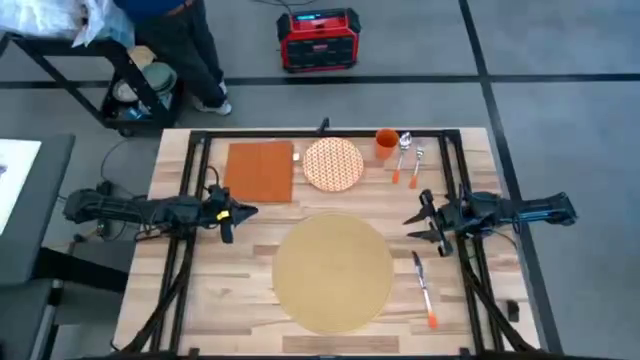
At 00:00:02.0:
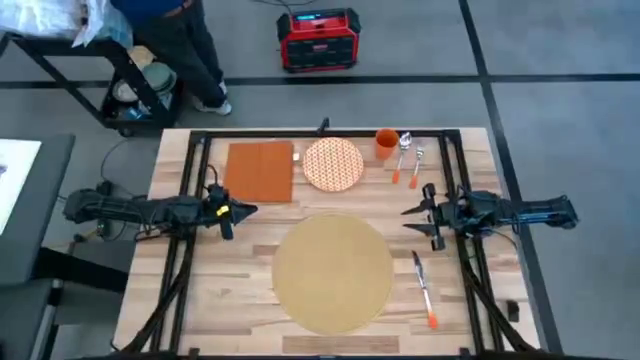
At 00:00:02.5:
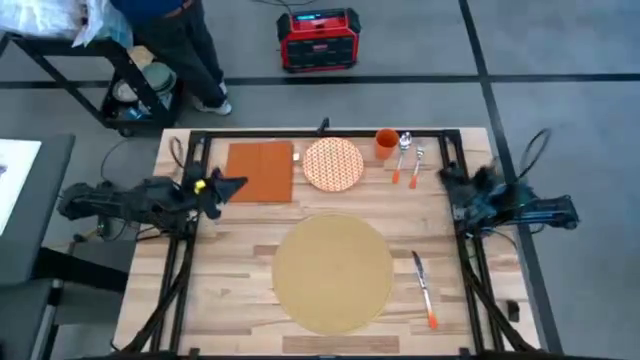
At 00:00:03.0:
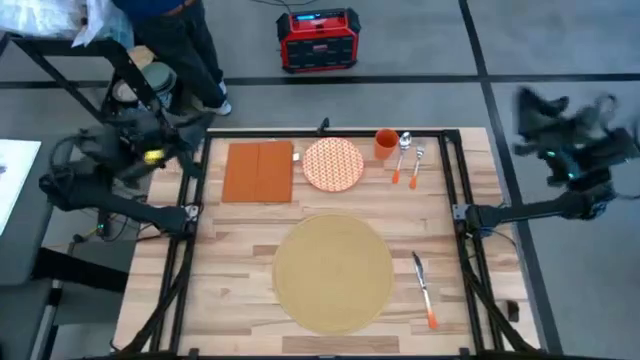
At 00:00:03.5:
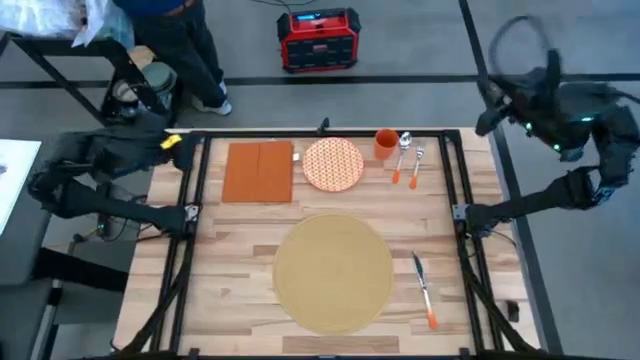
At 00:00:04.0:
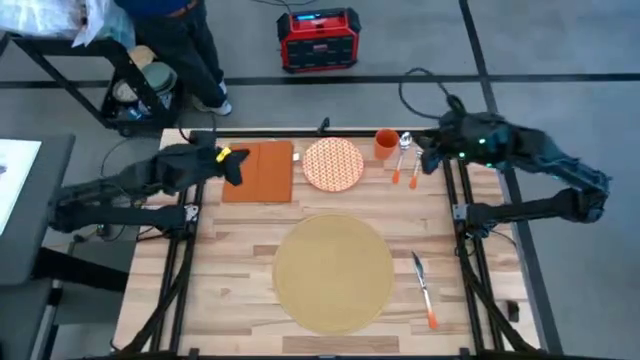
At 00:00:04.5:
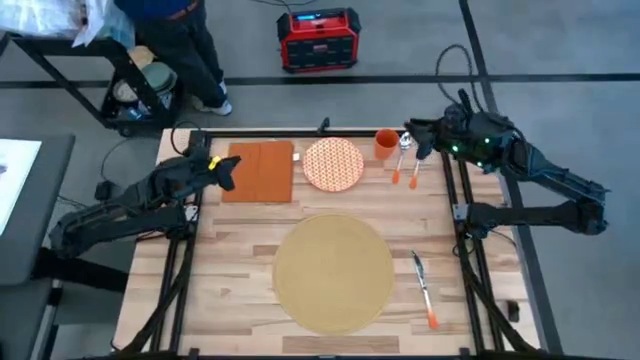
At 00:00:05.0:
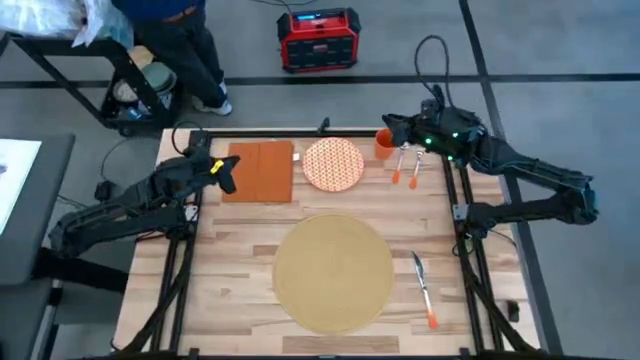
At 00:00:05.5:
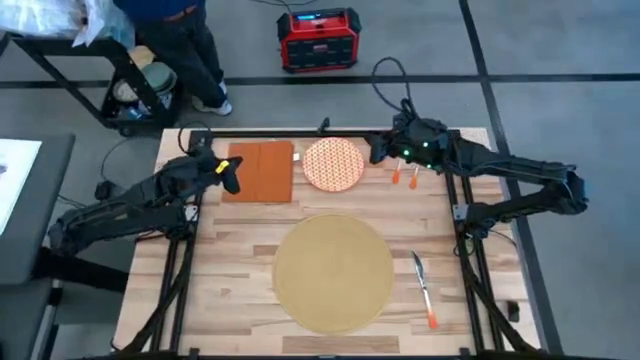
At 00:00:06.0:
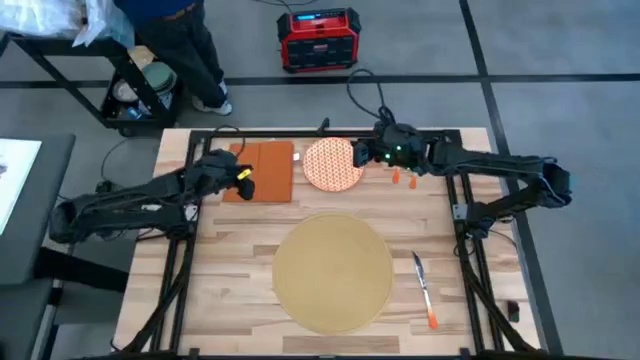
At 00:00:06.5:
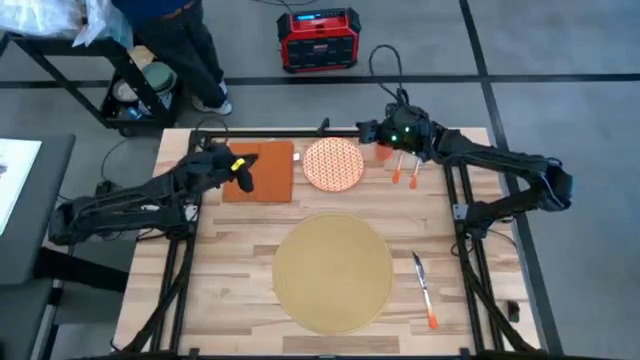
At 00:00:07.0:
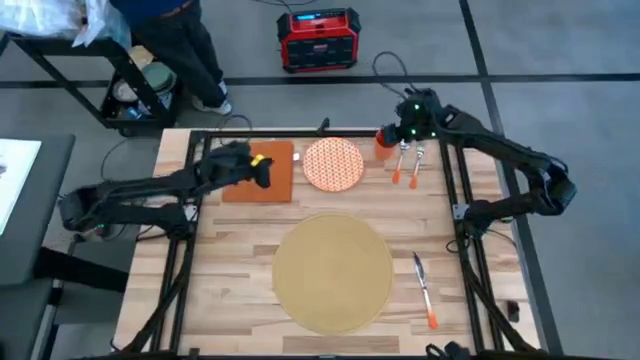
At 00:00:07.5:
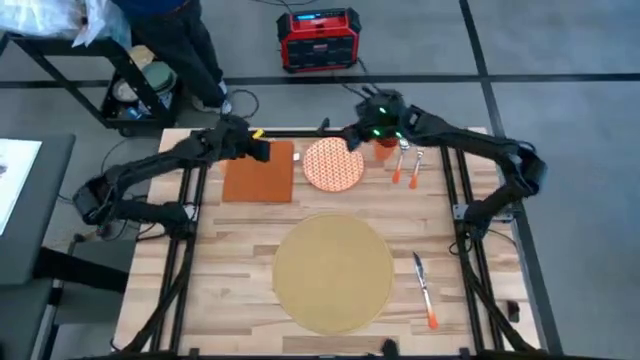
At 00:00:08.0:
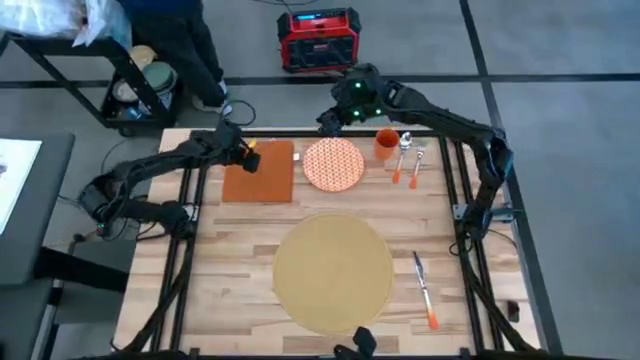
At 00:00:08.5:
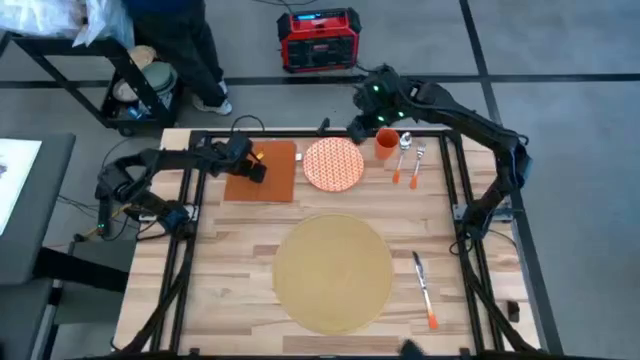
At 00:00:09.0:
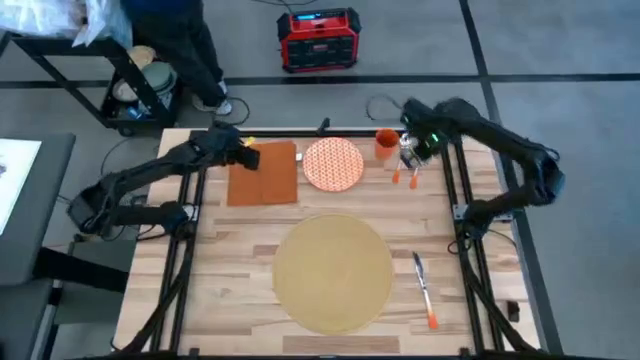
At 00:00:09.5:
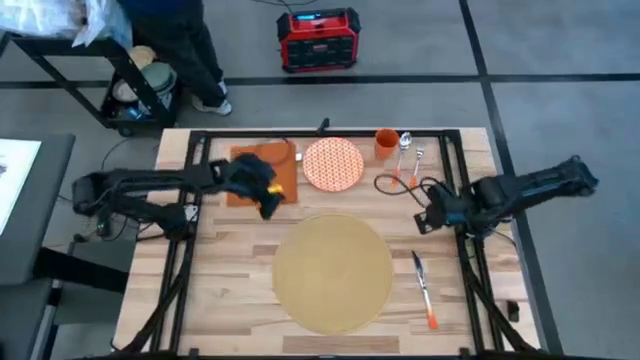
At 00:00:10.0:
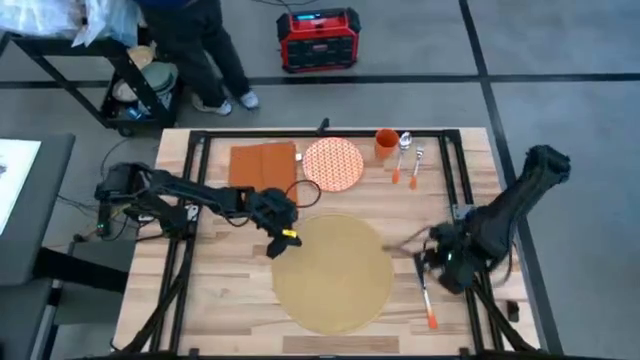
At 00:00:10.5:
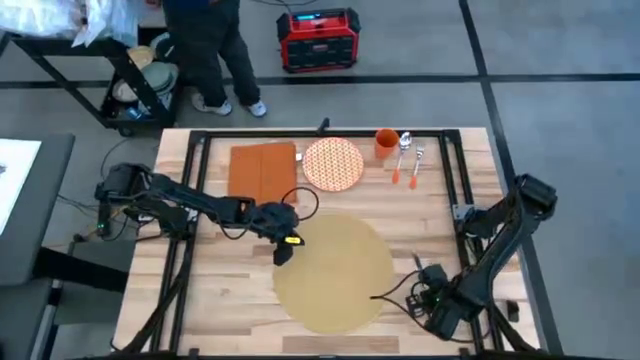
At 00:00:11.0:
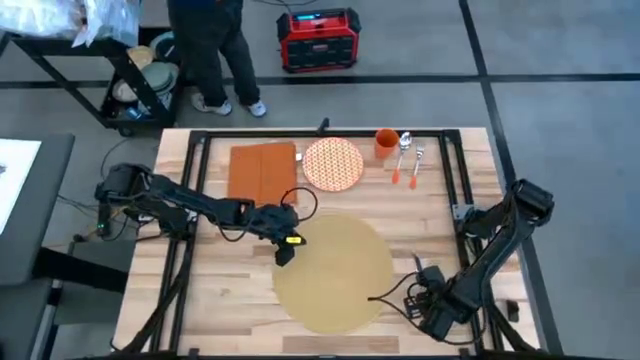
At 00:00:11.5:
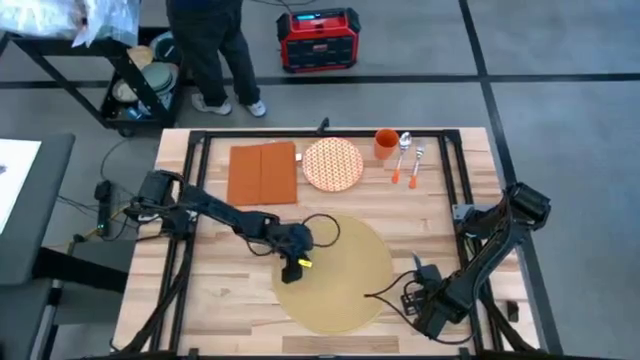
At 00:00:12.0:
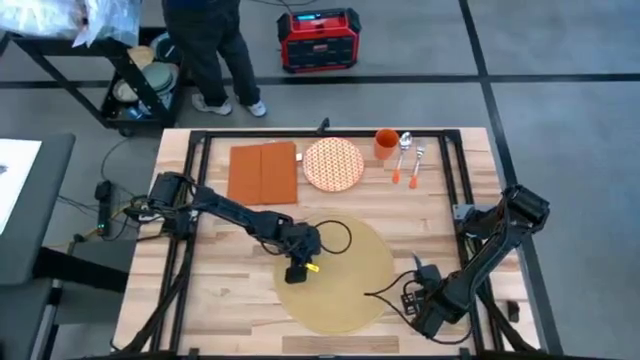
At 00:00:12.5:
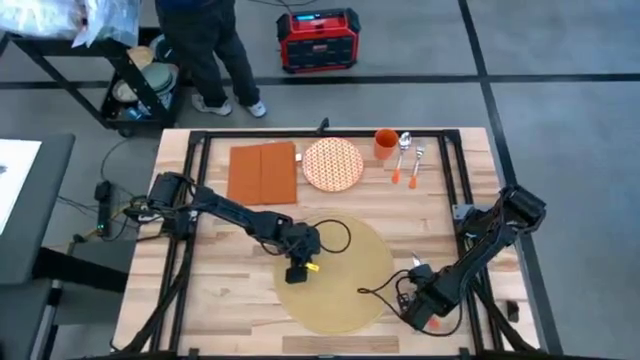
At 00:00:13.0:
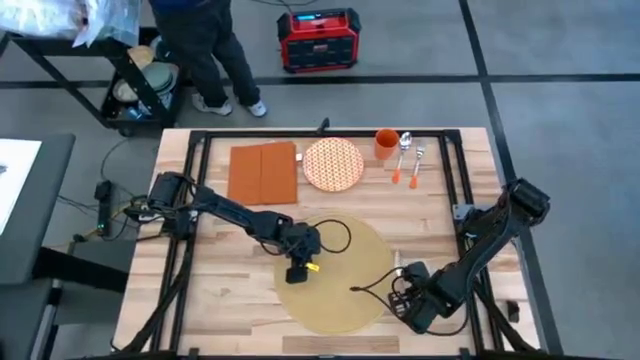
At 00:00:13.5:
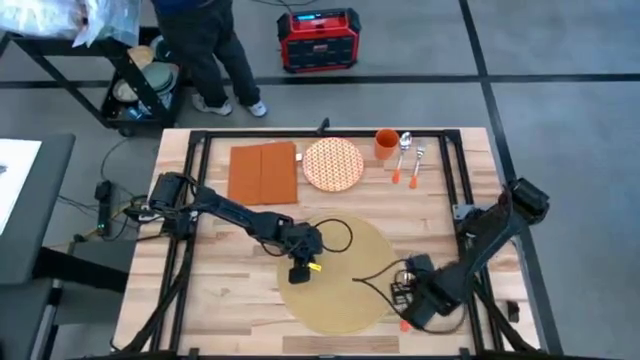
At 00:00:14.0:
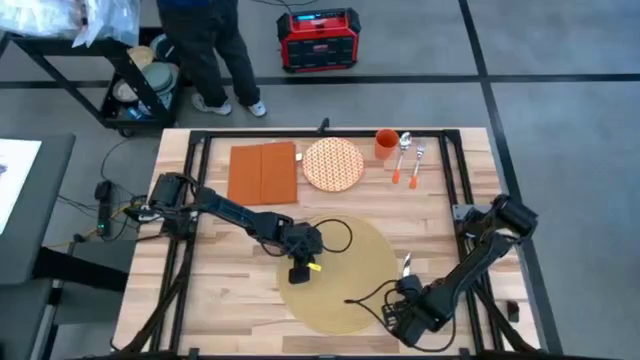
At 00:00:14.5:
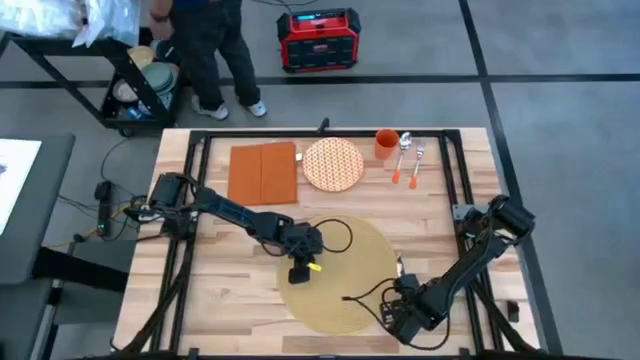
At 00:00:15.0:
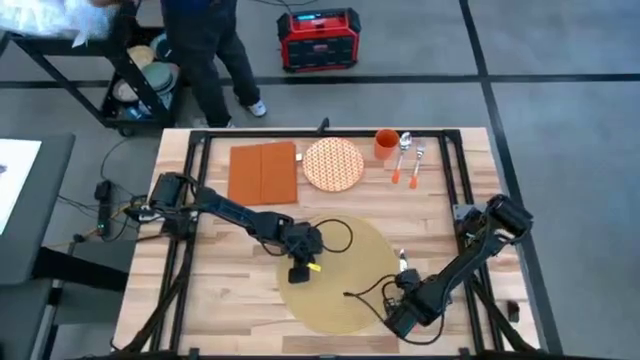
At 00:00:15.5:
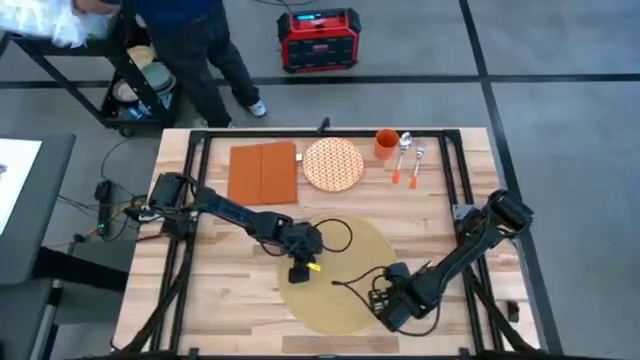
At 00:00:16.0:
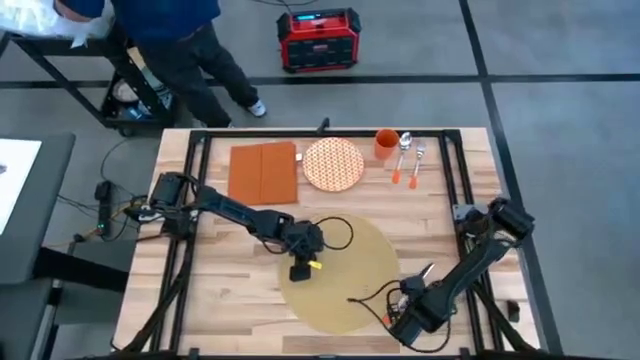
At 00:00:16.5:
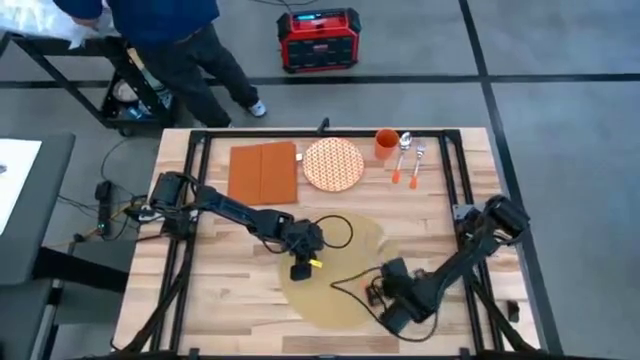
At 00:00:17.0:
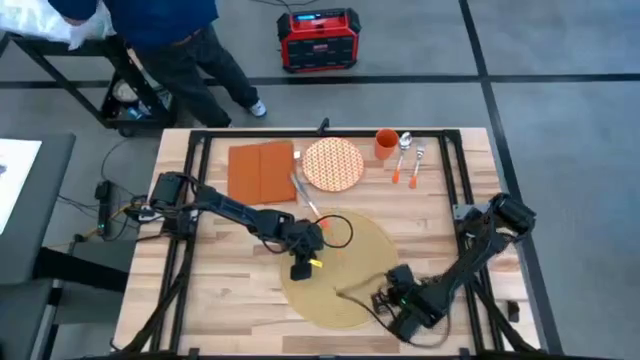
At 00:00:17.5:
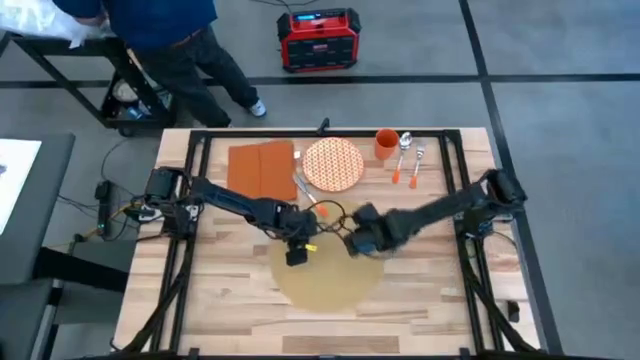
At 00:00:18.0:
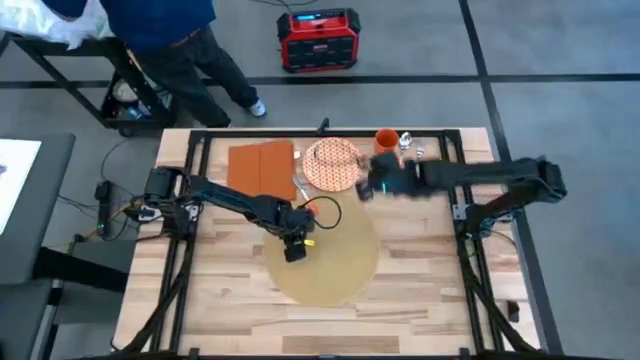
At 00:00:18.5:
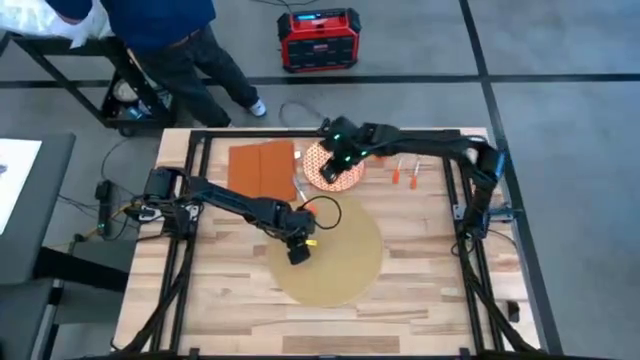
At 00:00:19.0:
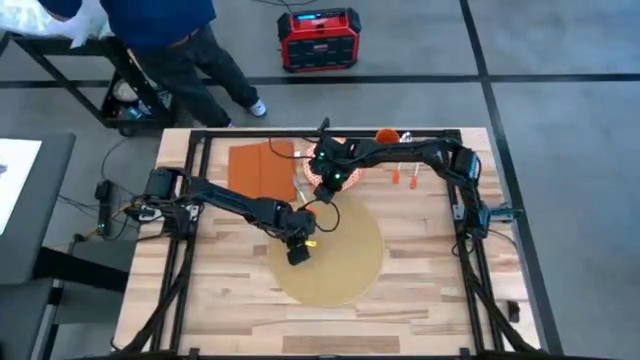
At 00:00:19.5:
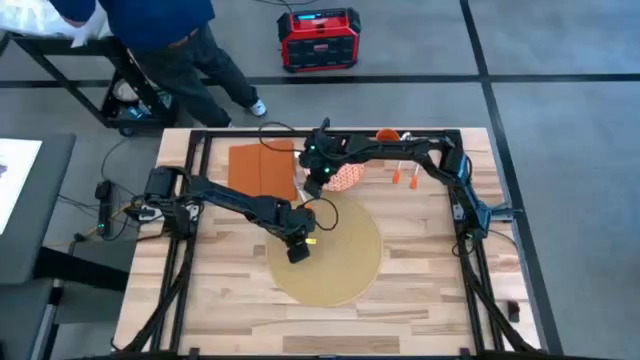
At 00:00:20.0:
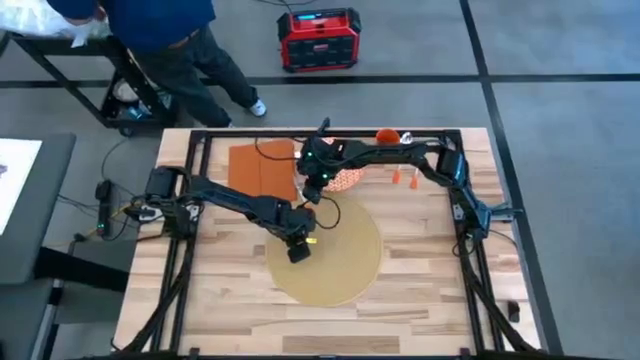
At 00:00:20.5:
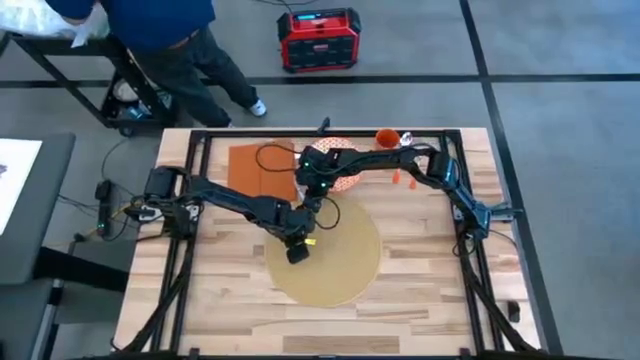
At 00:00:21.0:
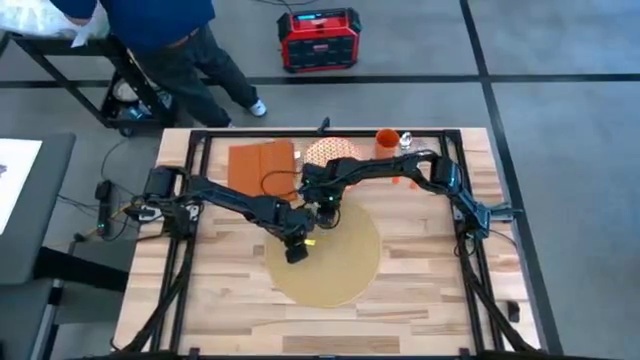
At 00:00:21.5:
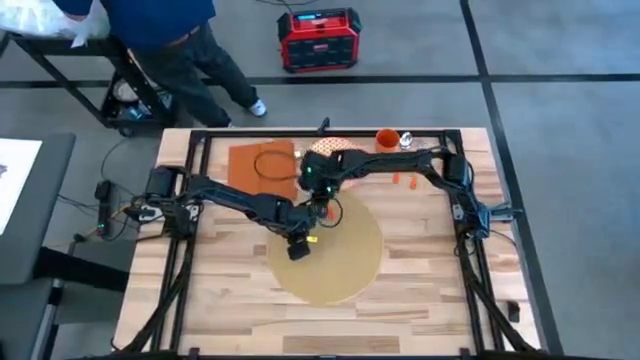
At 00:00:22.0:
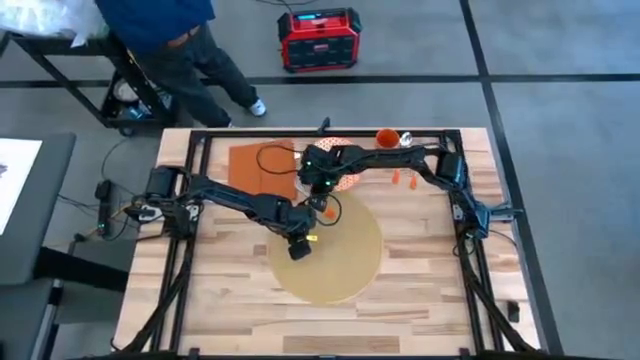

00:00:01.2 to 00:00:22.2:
Task: Set table place
Put the orange knife on the brown placemat

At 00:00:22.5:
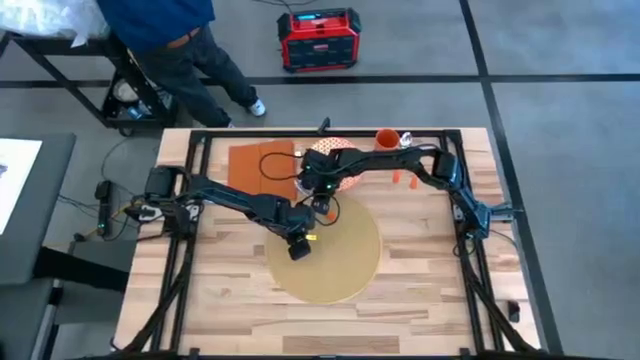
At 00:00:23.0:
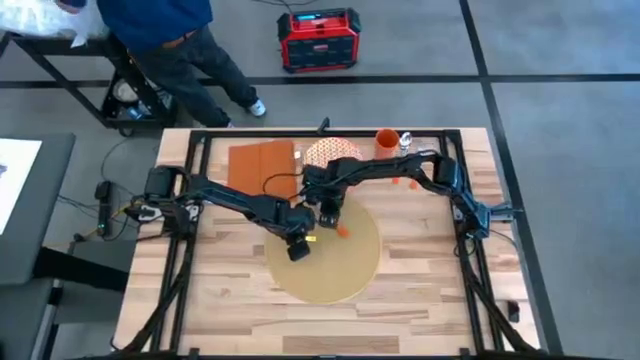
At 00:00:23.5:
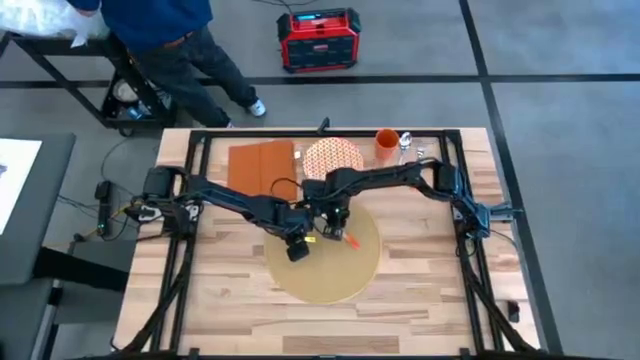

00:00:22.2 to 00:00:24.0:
Put the orange knife on the brown placemat
